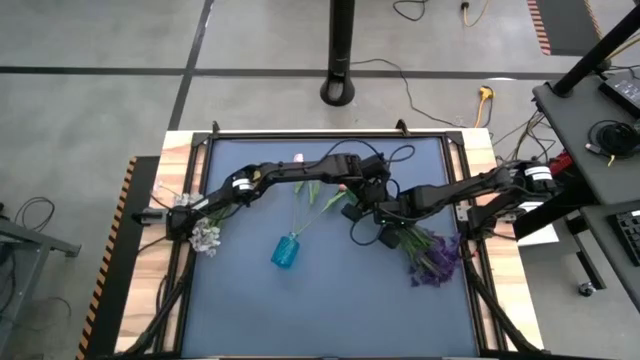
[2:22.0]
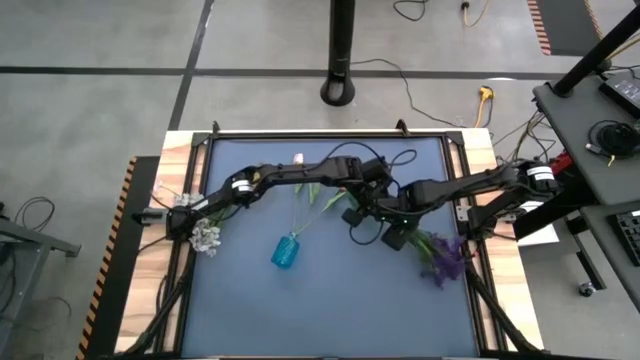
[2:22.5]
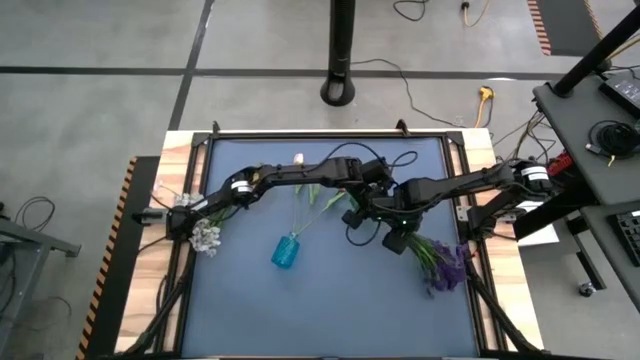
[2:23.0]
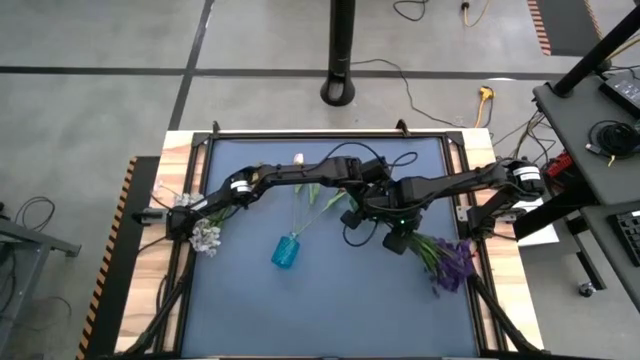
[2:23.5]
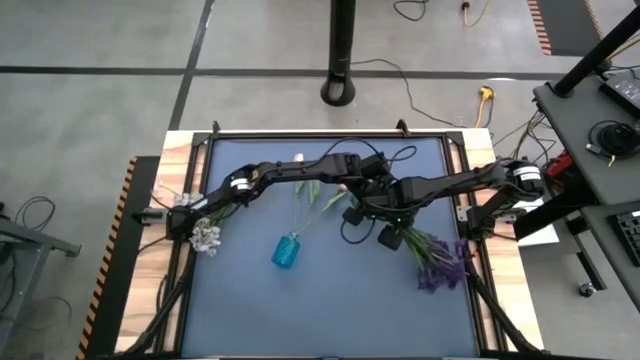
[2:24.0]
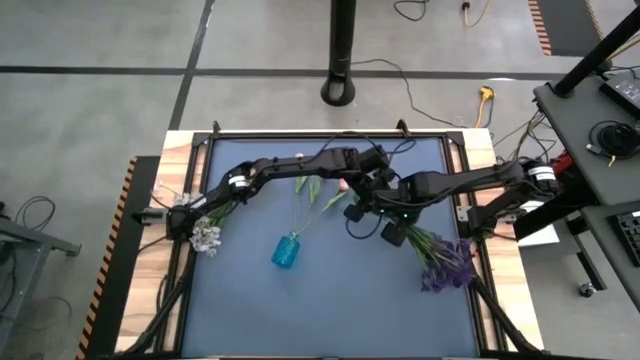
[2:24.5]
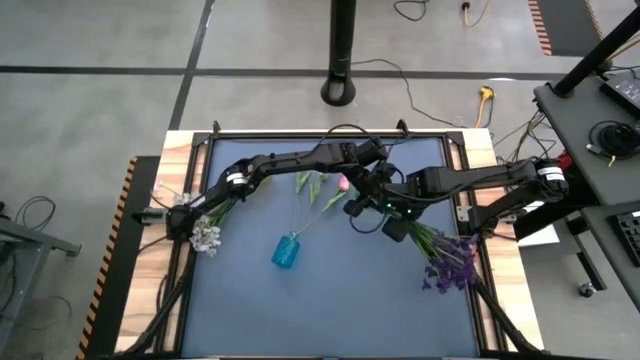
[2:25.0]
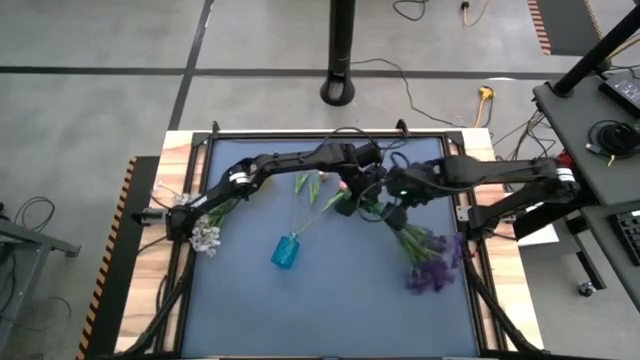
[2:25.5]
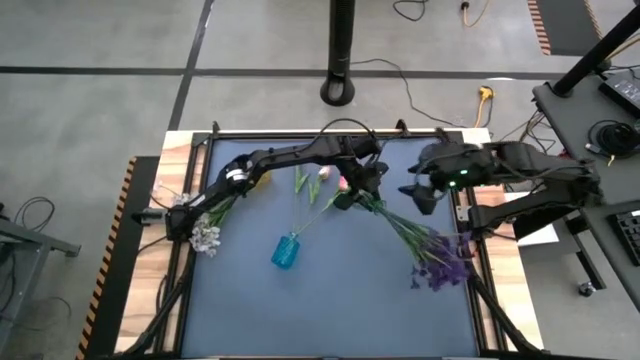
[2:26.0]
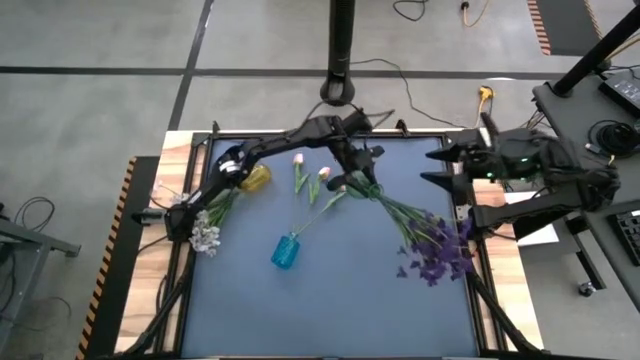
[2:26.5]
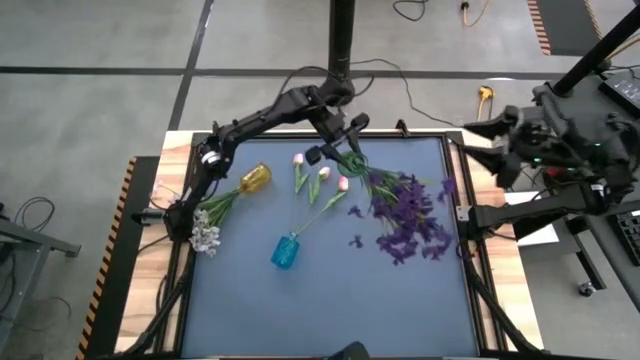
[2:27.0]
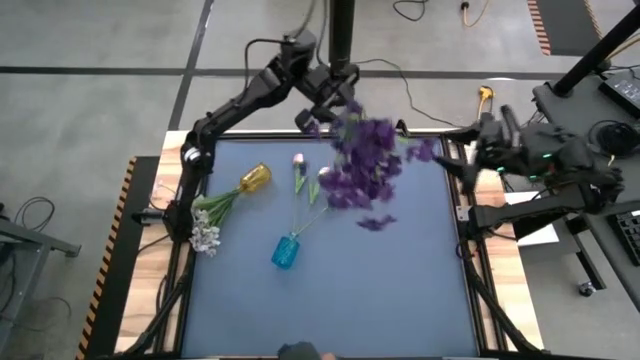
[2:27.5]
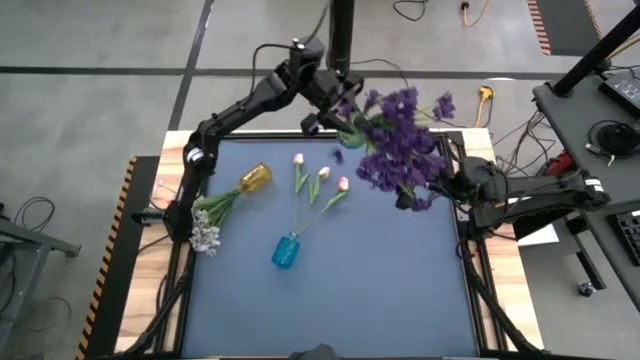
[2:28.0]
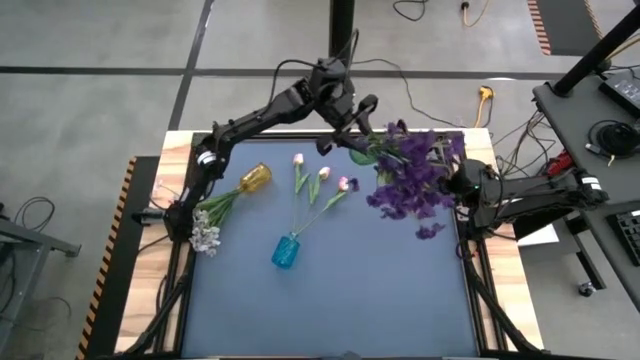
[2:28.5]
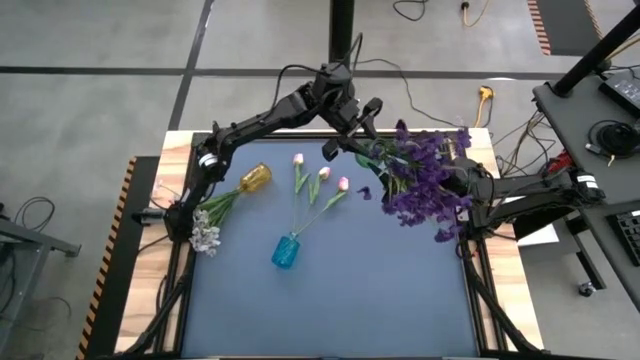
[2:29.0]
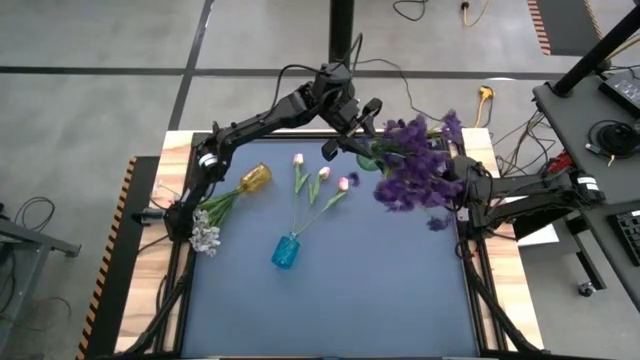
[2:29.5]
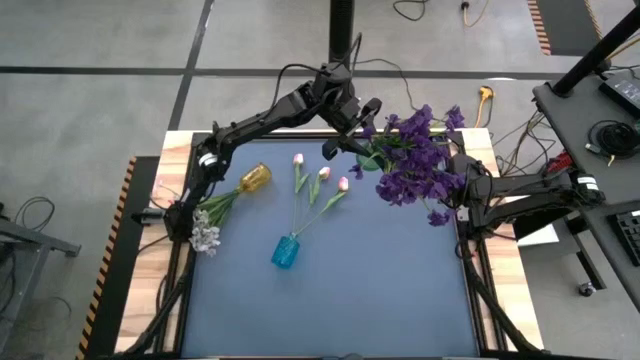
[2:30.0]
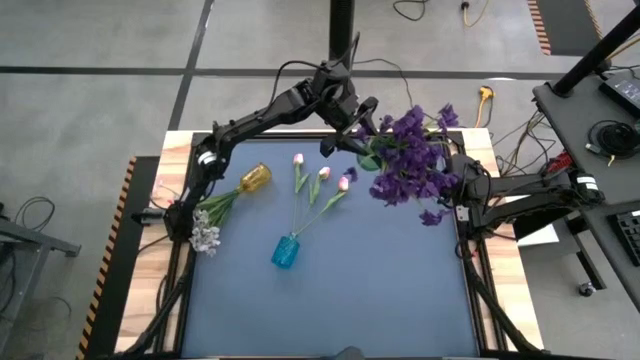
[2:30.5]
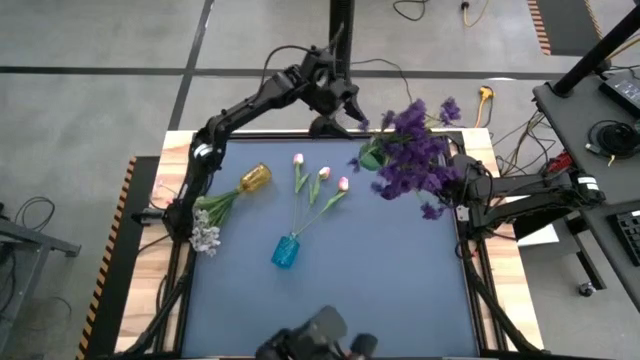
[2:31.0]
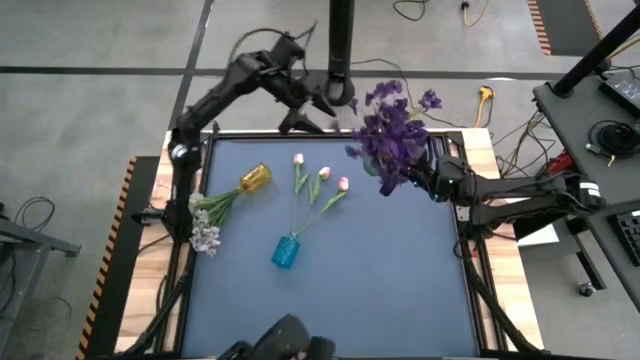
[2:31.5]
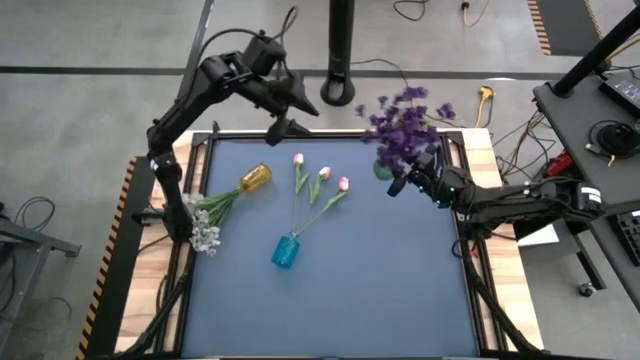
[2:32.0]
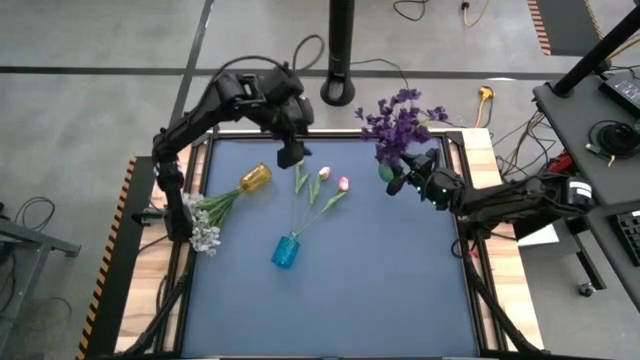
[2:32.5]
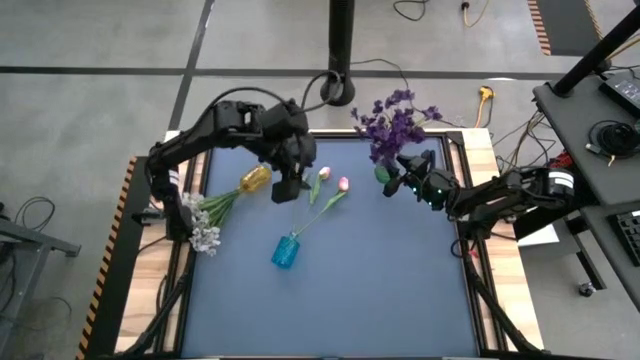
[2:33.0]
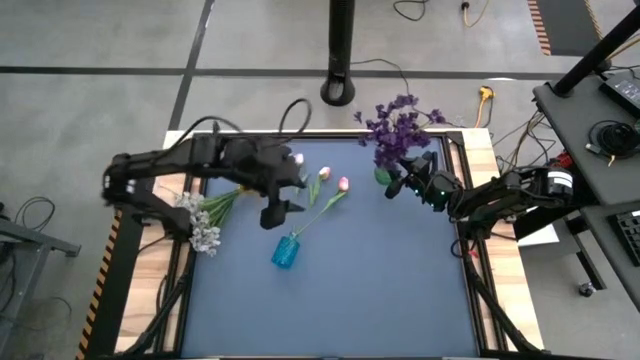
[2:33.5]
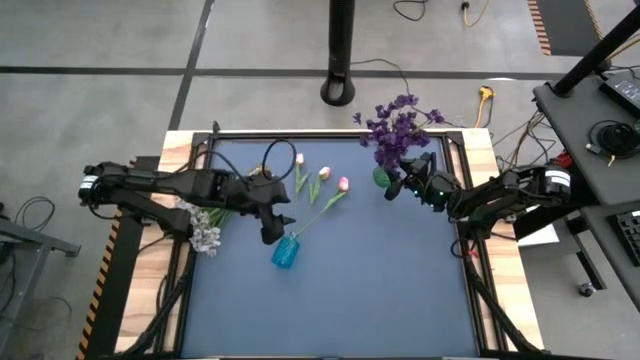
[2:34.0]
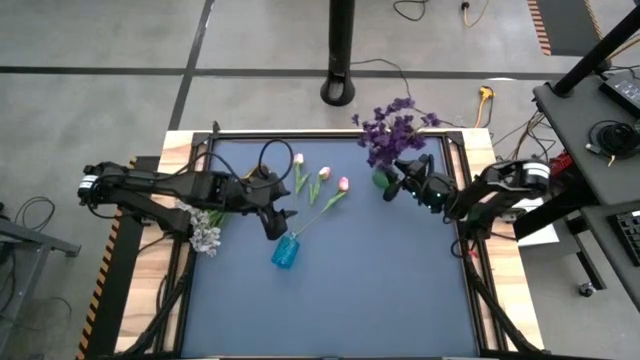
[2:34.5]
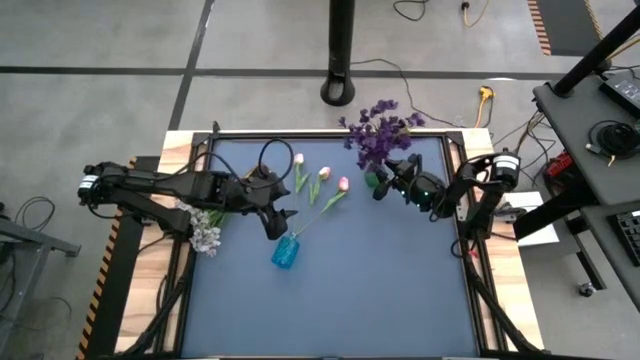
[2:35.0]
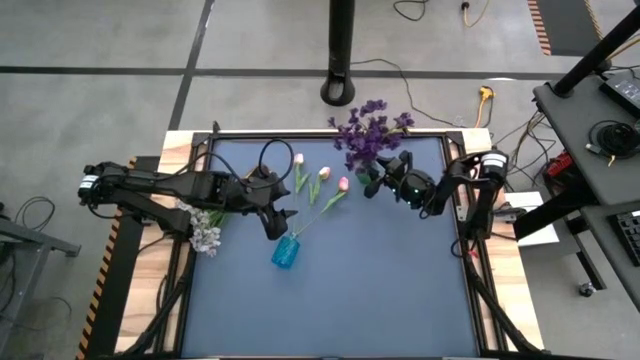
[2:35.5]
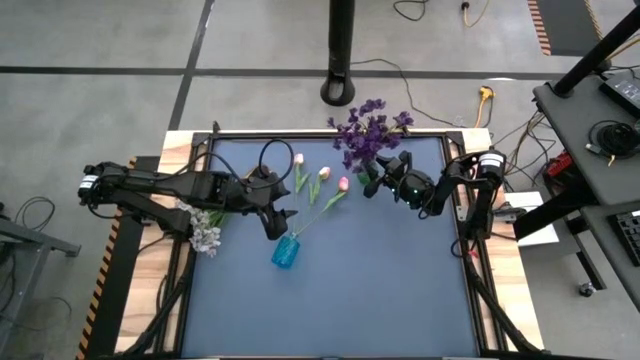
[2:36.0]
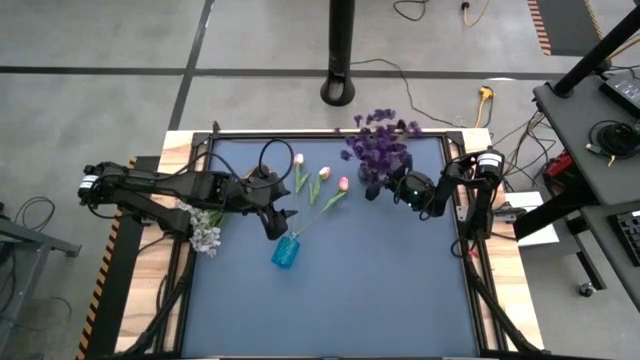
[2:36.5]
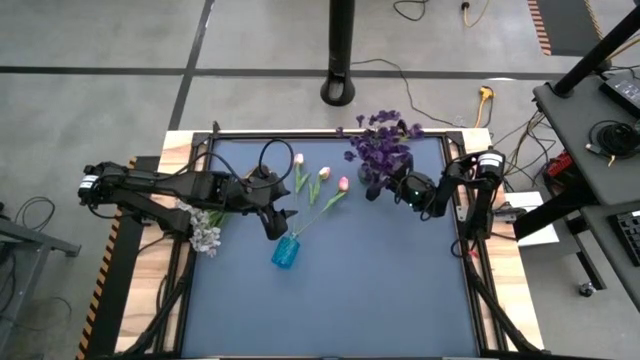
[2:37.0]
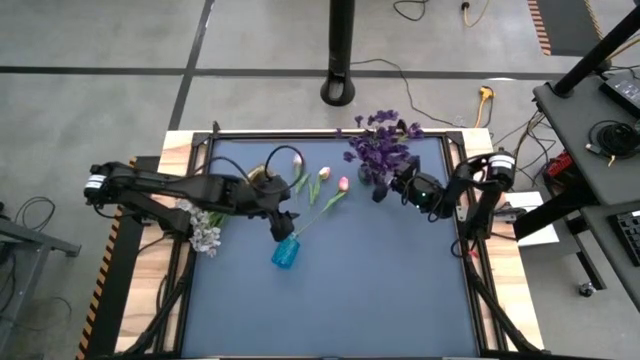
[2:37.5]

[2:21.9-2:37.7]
Task: Sort flowers into vase by color
Put the green vase with flowers on the table

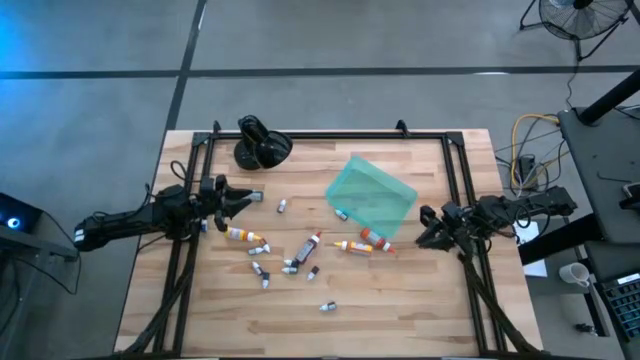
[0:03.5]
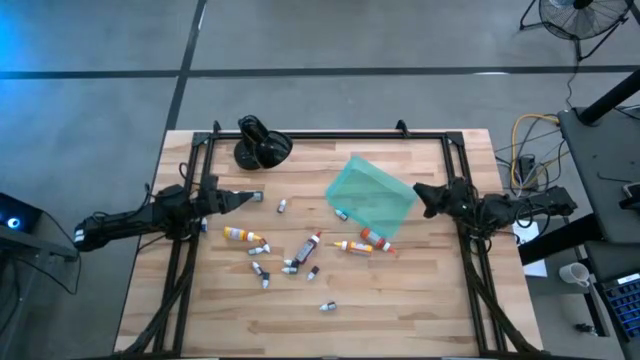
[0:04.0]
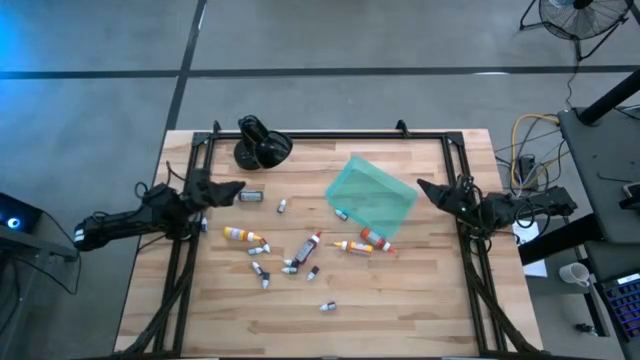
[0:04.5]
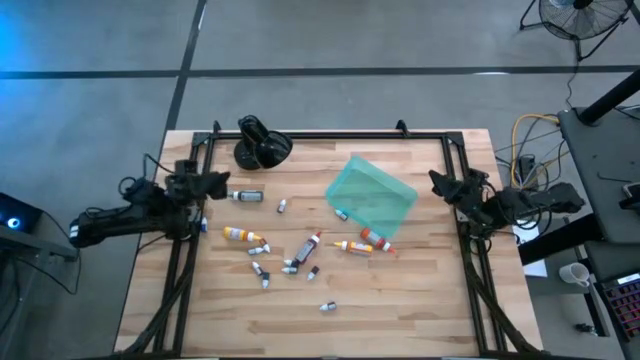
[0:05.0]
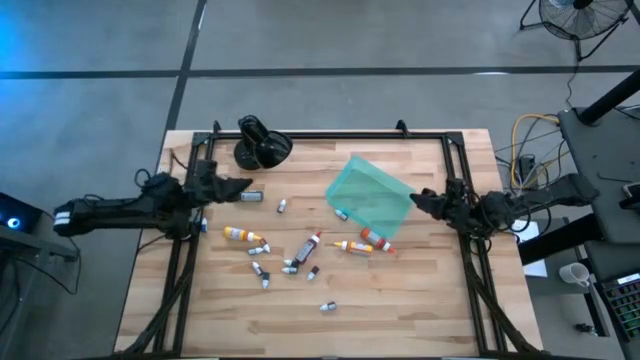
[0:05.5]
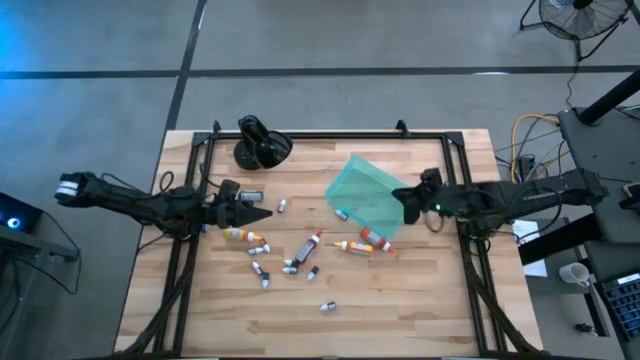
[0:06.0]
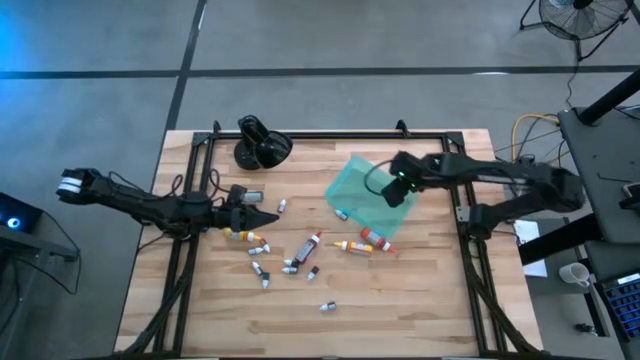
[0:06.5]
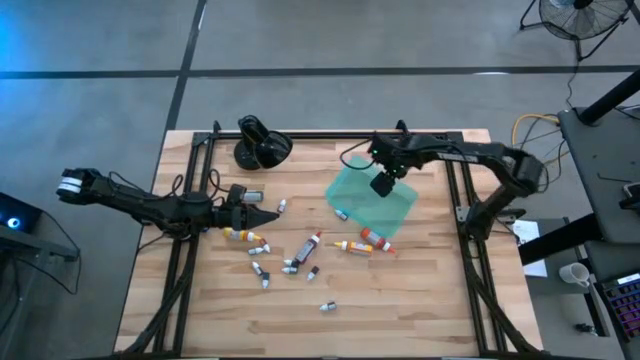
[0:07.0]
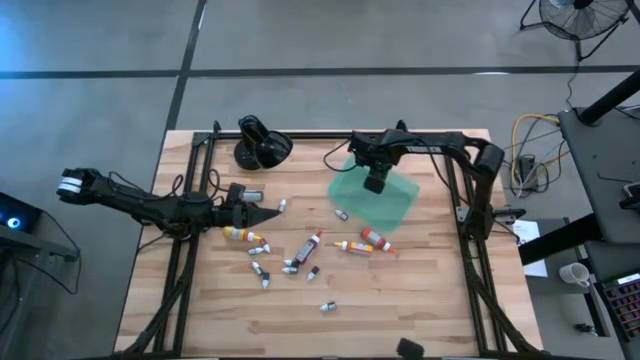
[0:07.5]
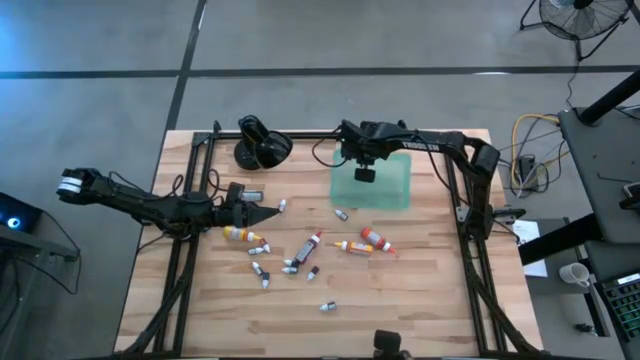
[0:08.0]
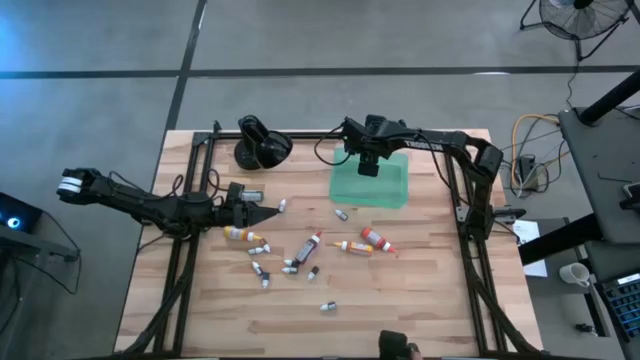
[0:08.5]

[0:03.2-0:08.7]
Task: Pick & Place food coloring
Adjust the green bin
